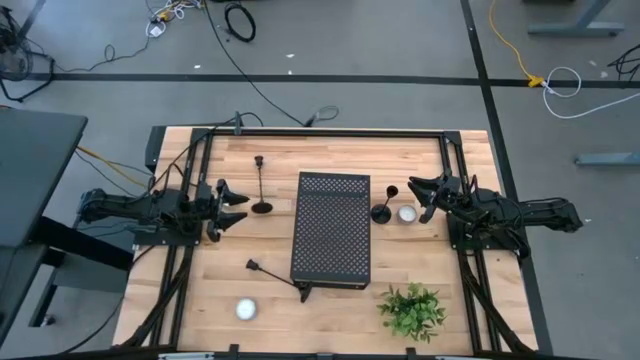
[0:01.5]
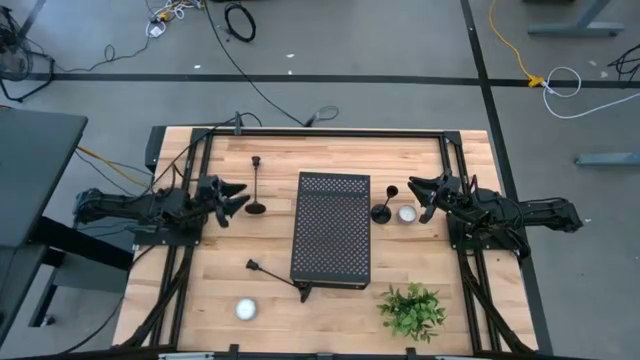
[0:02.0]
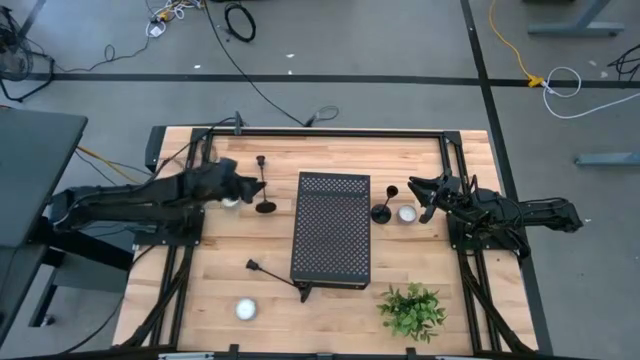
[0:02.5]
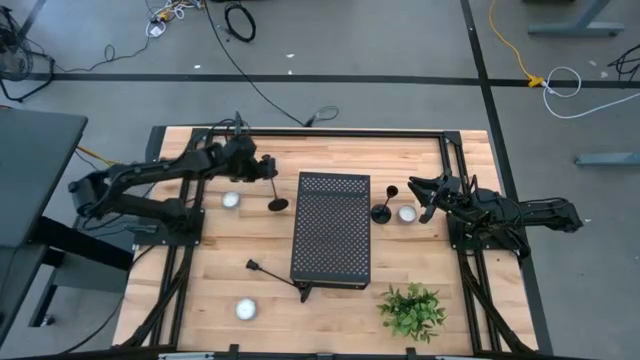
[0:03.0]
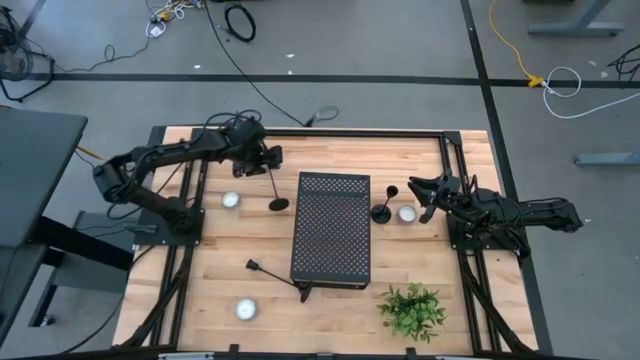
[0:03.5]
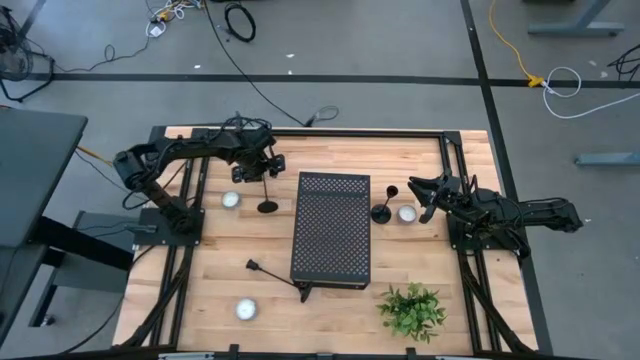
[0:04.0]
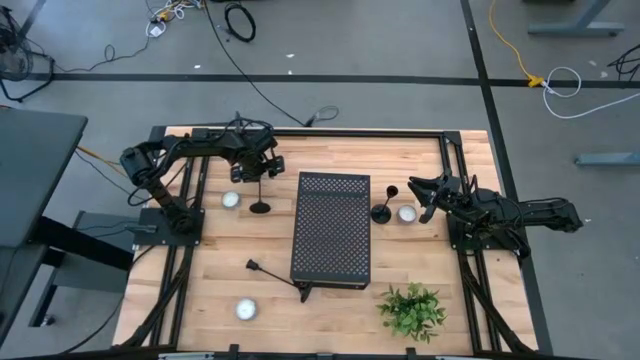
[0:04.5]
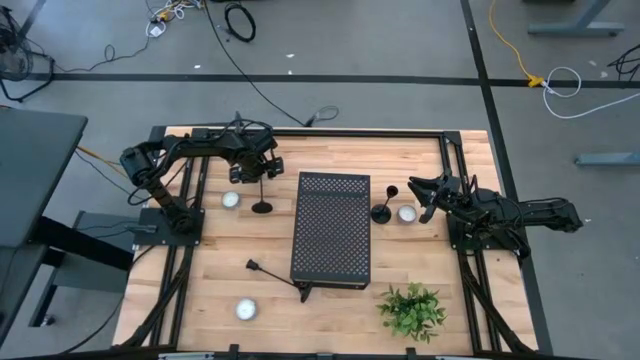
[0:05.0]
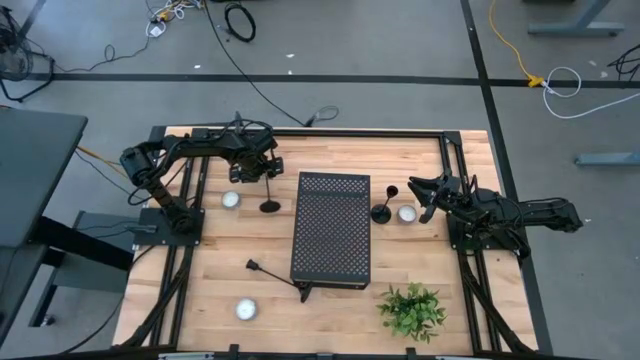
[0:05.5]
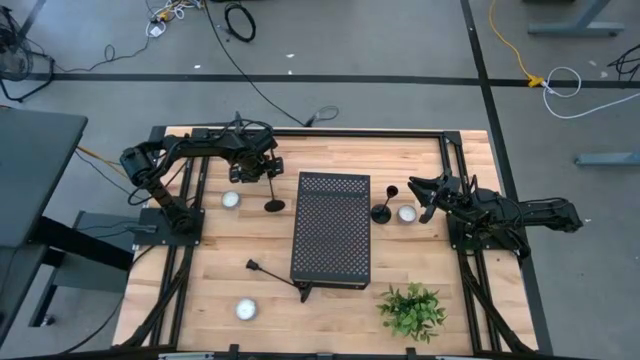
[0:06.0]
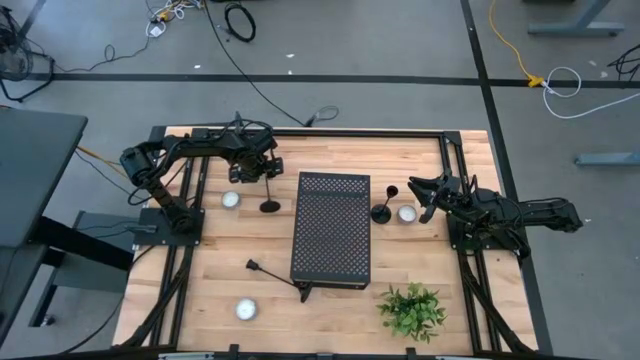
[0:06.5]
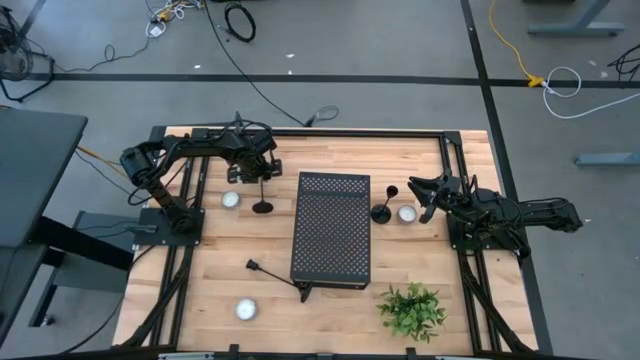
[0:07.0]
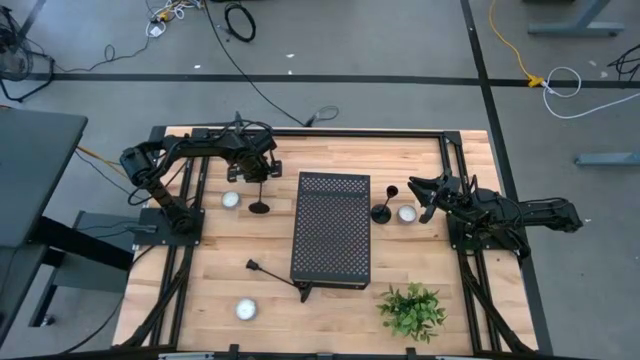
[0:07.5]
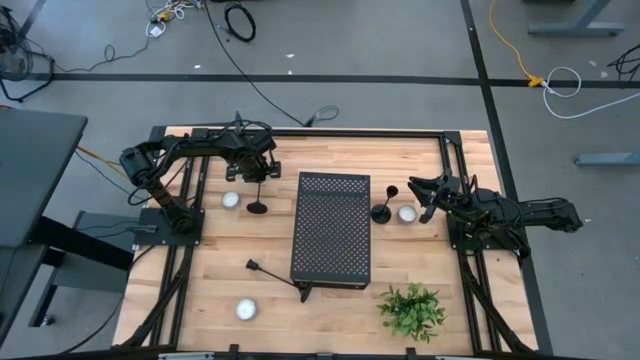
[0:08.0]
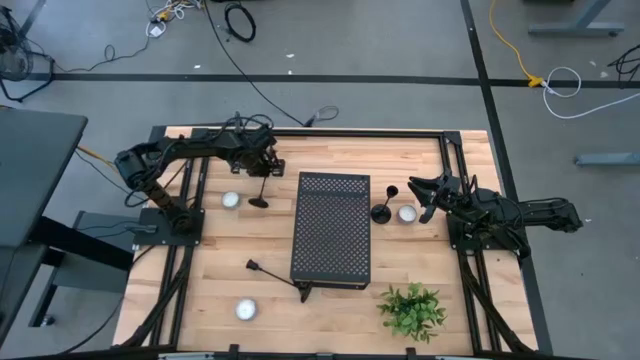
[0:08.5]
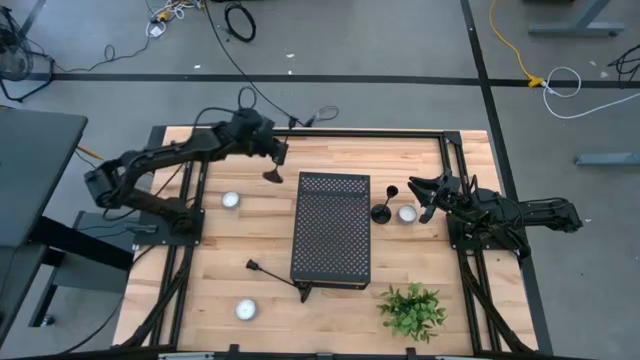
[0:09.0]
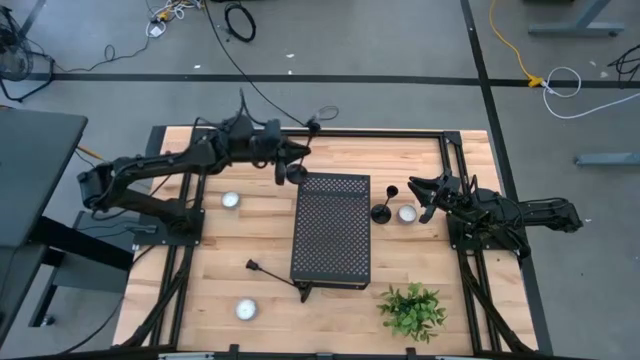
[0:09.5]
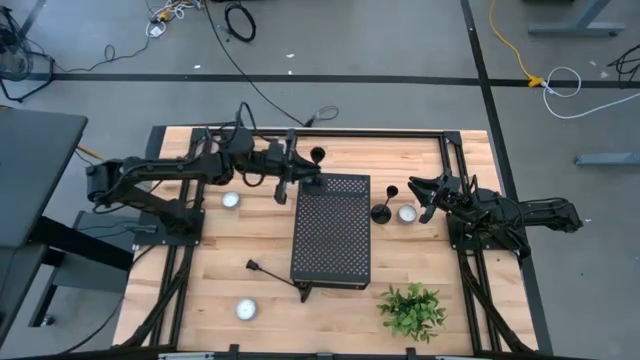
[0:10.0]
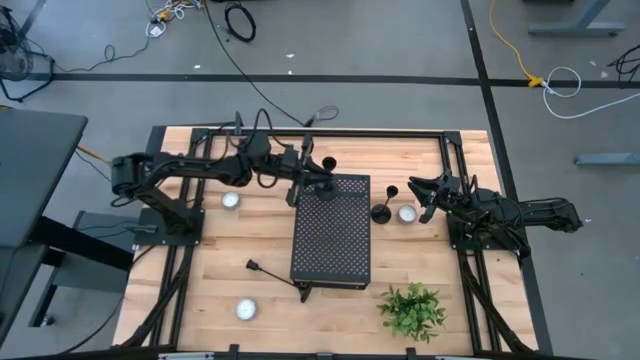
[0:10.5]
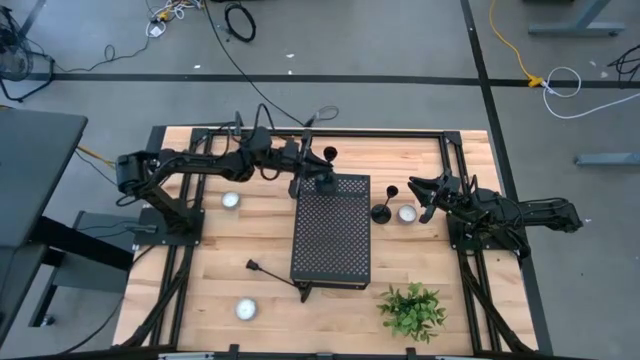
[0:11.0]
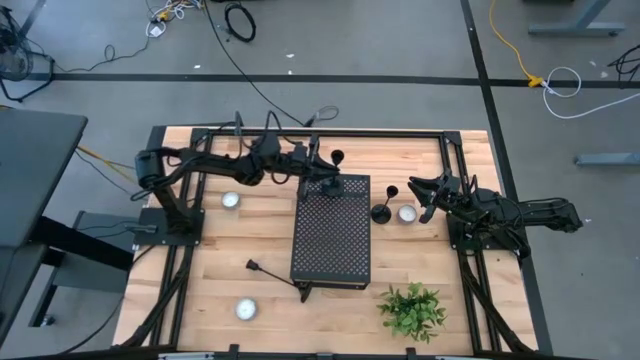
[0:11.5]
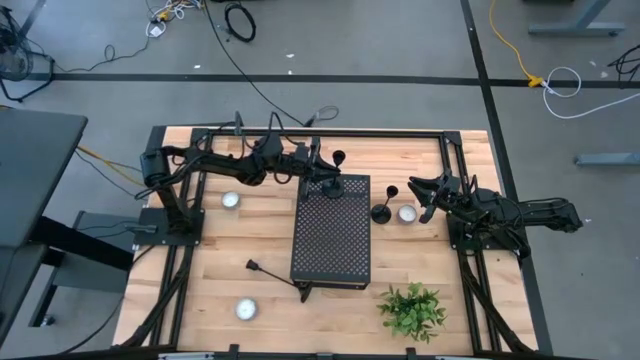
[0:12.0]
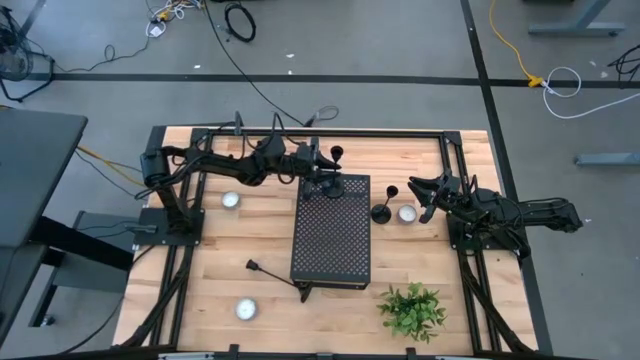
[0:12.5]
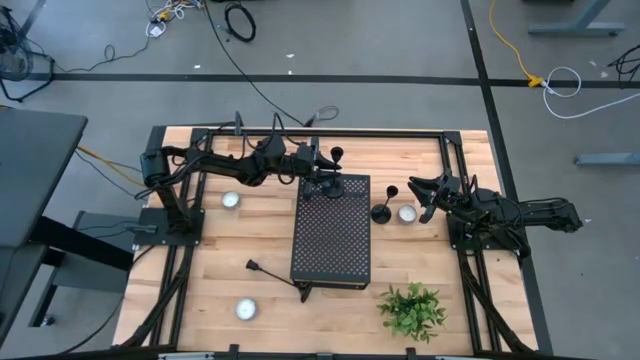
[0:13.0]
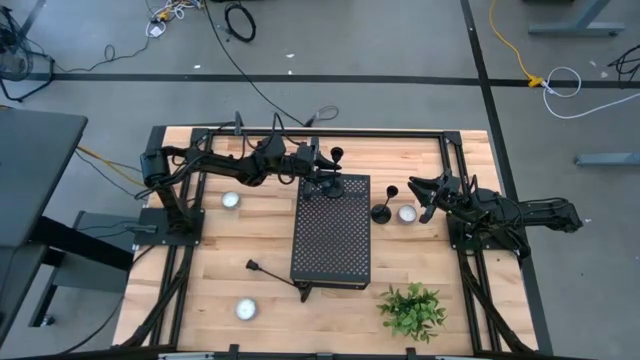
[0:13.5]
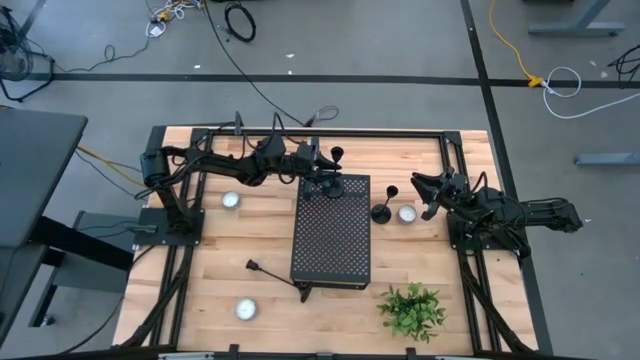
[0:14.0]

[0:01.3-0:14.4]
Task: Pick & Place candle stick holders
Put the top left black candle holder on the shelf

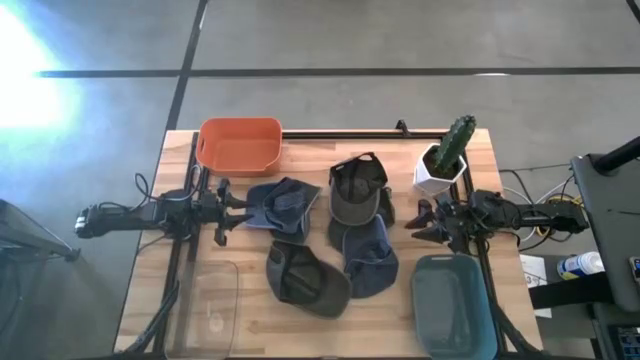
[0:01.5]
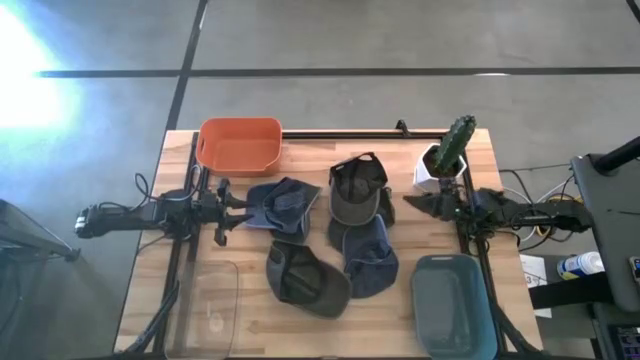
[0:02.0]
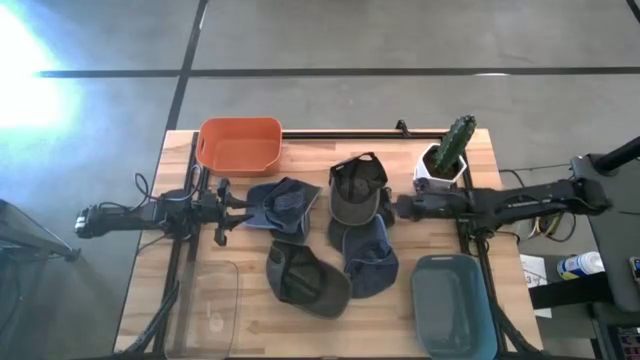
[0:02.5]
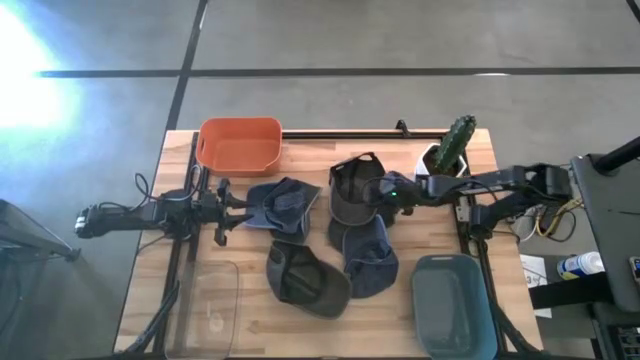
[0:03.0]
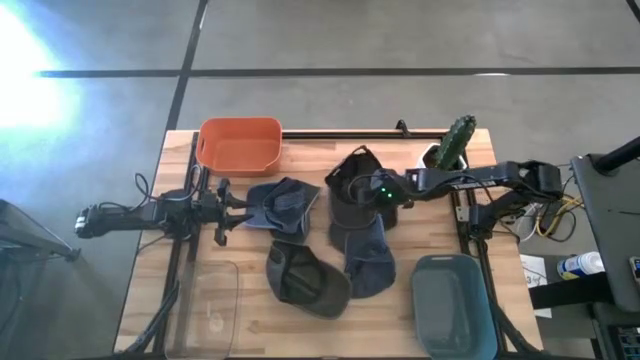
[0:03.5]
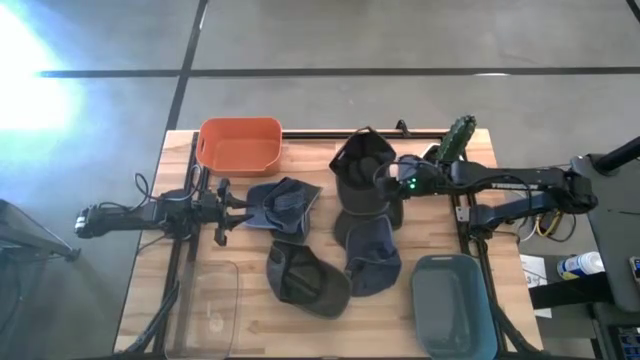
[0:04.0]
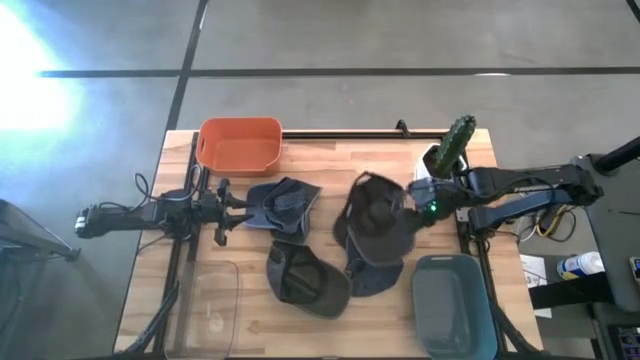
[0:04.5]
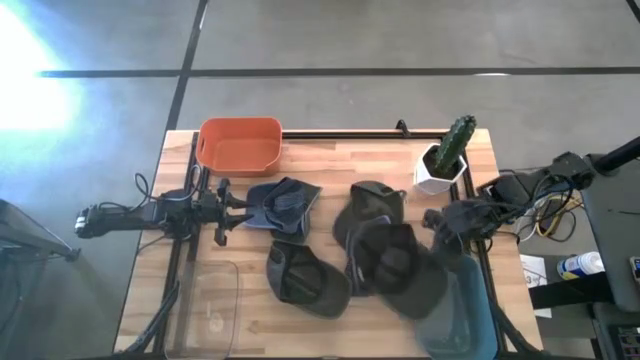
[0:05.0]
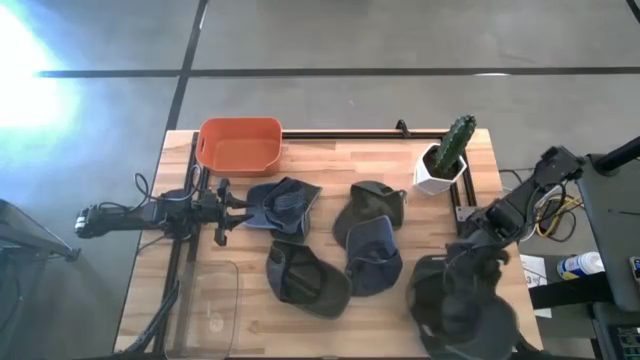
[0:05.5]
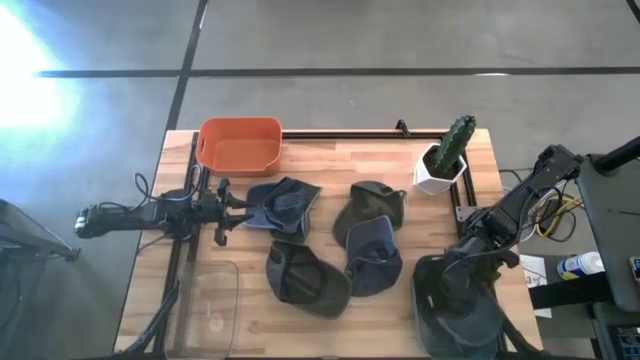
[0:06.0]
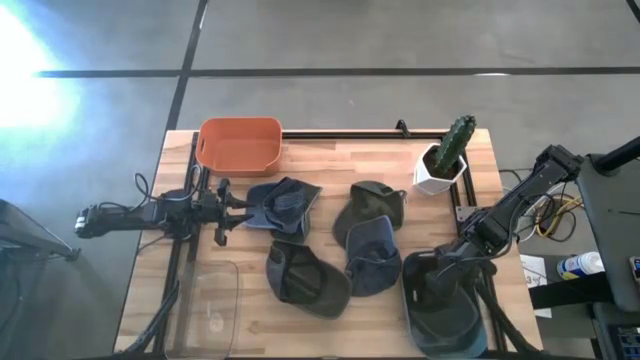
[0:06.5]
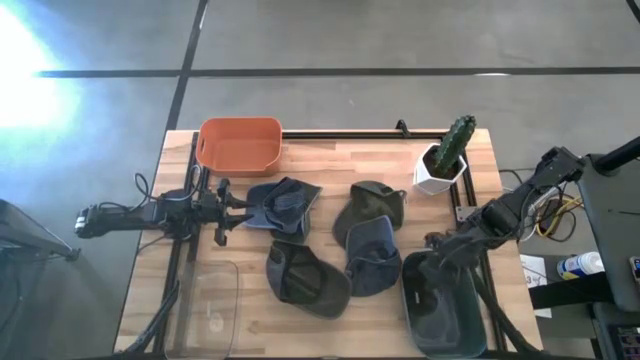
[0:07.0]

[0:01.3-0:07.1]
Task: Pick & Place hat
Put the top black cap into the blue bin
